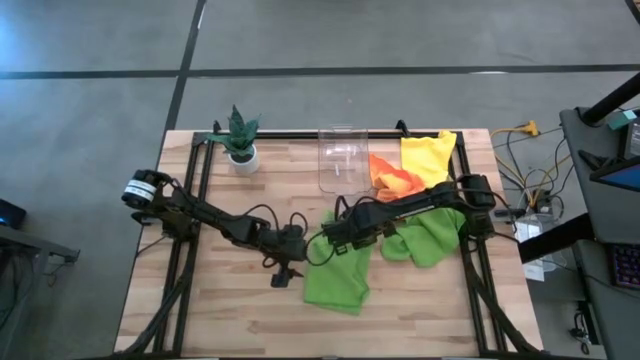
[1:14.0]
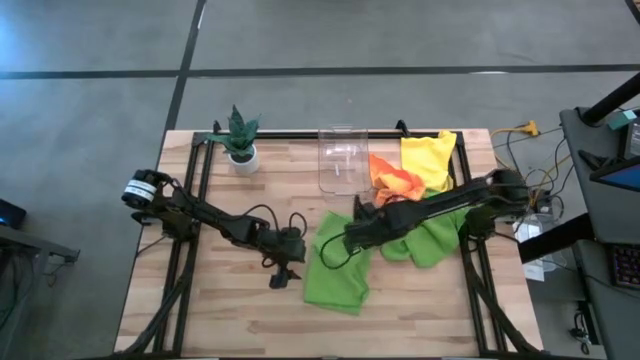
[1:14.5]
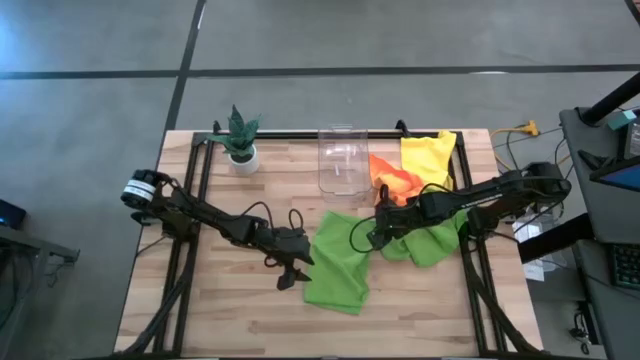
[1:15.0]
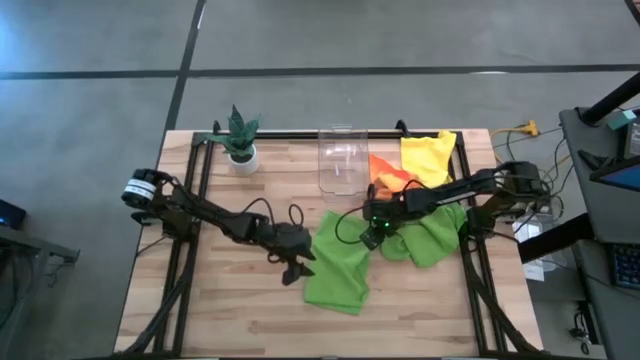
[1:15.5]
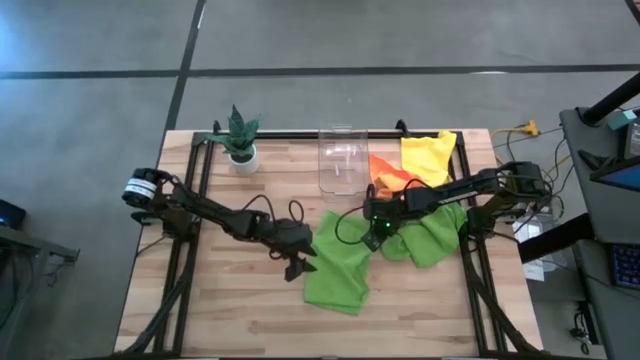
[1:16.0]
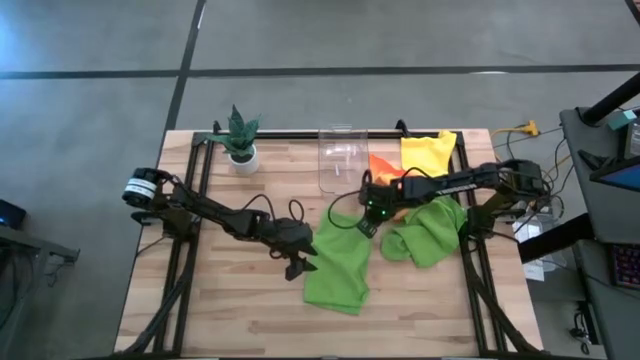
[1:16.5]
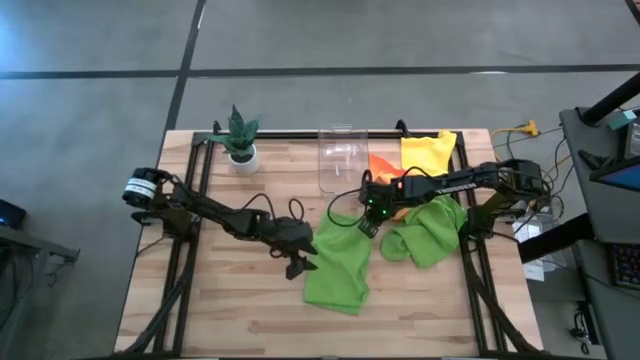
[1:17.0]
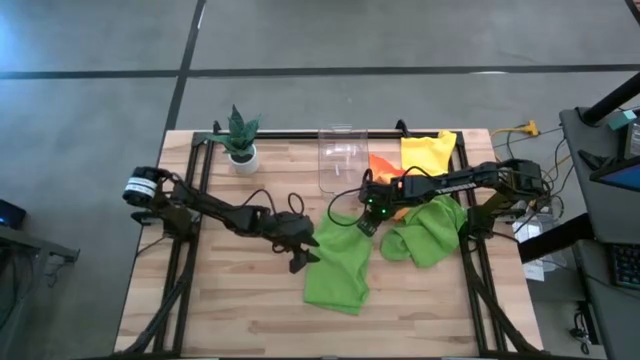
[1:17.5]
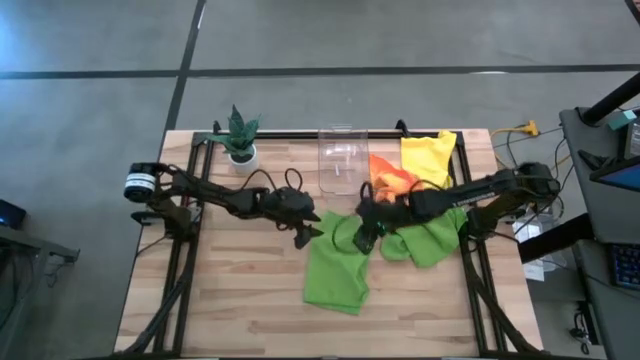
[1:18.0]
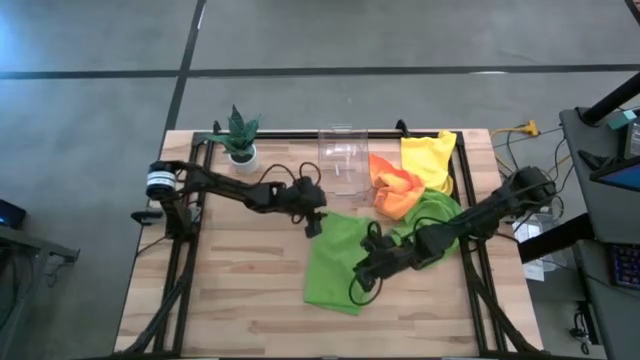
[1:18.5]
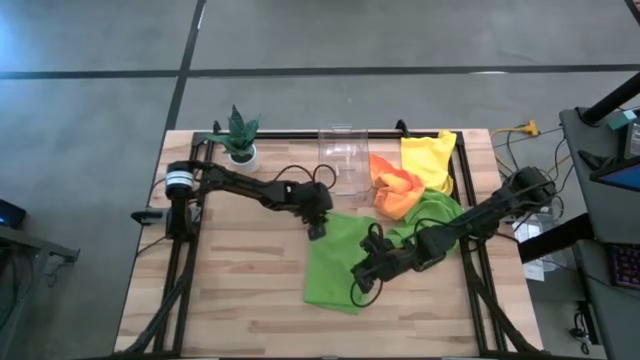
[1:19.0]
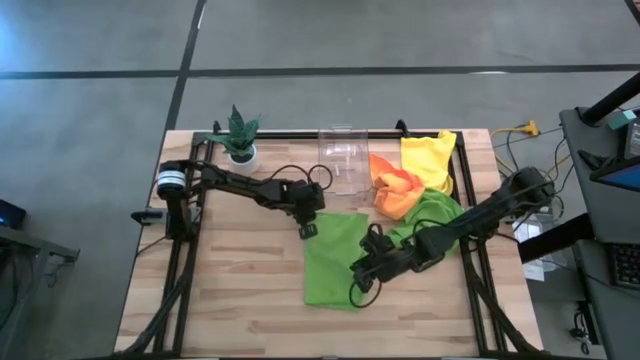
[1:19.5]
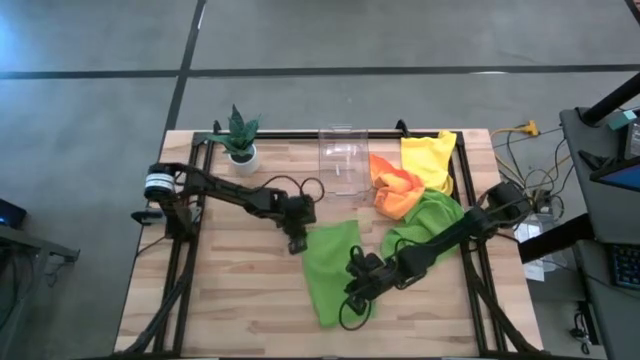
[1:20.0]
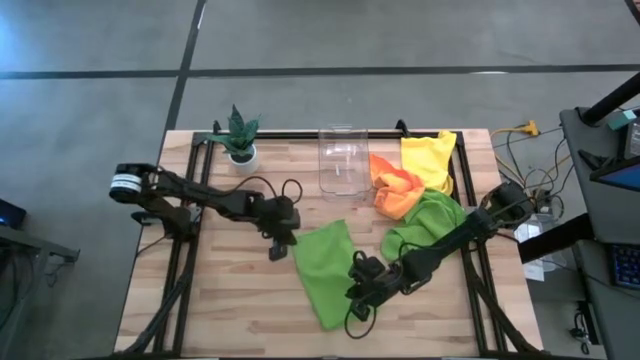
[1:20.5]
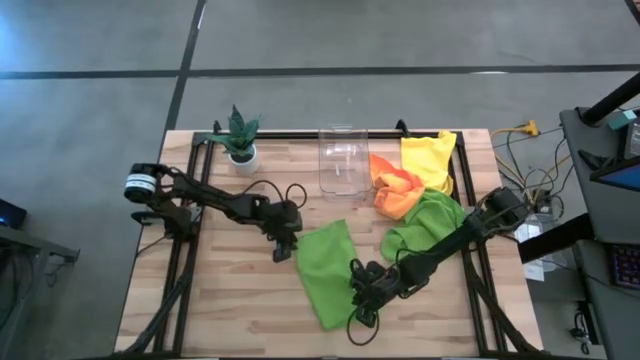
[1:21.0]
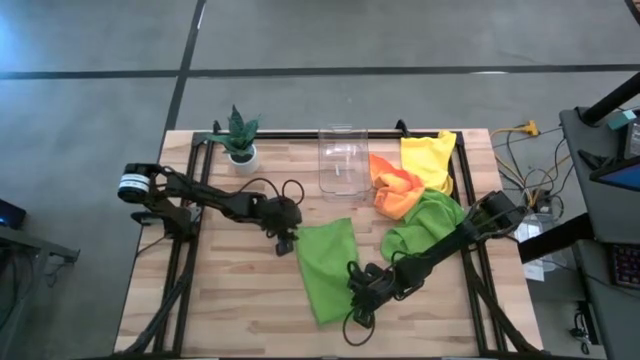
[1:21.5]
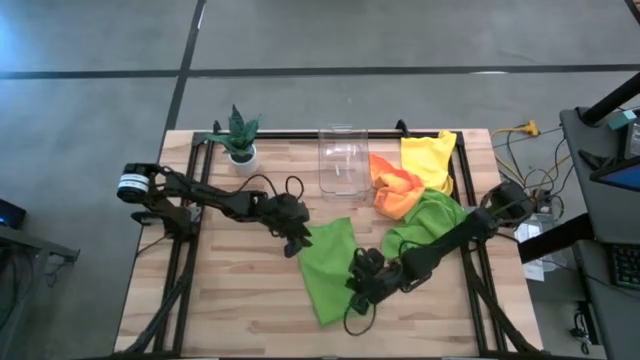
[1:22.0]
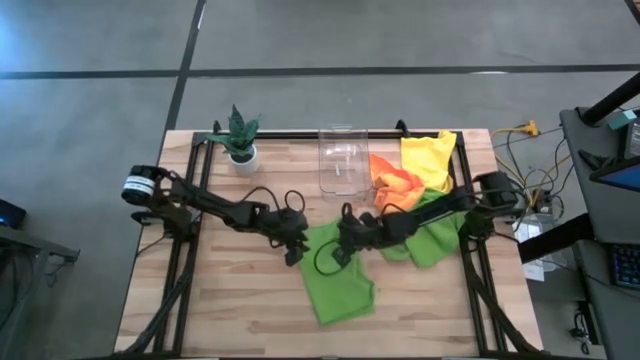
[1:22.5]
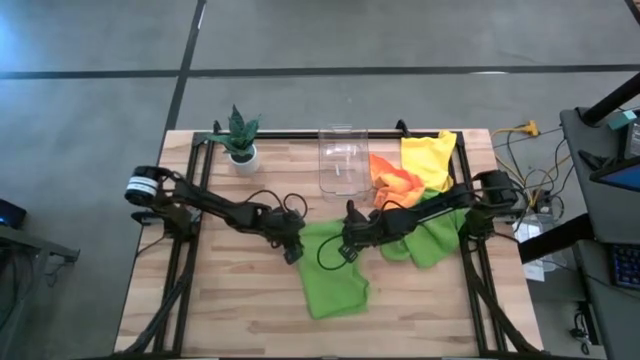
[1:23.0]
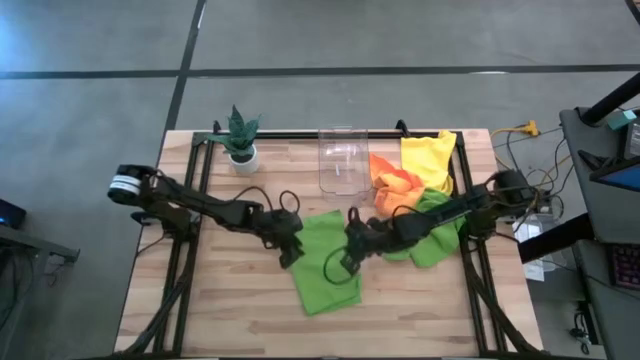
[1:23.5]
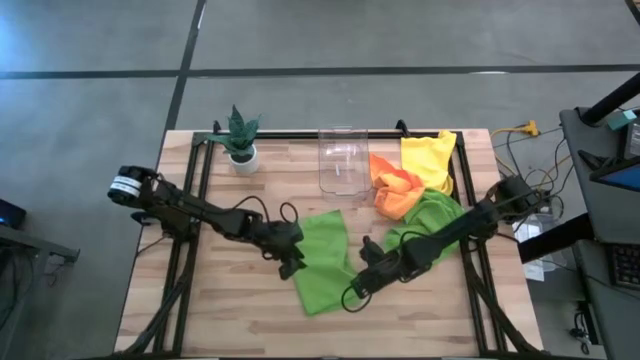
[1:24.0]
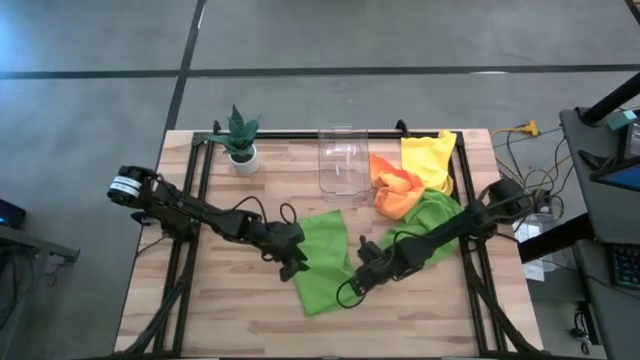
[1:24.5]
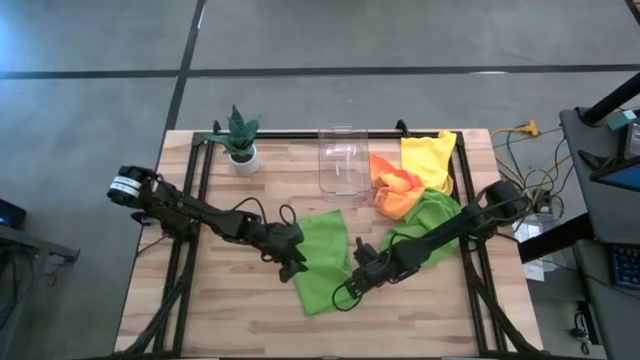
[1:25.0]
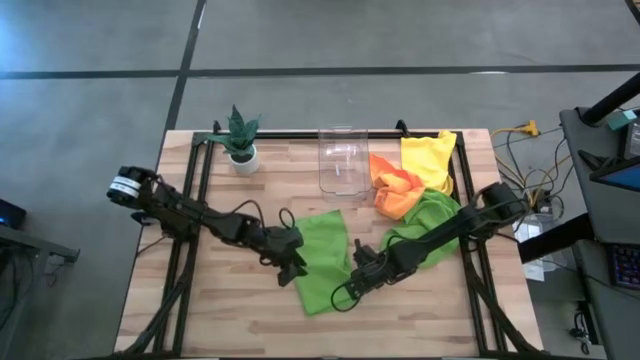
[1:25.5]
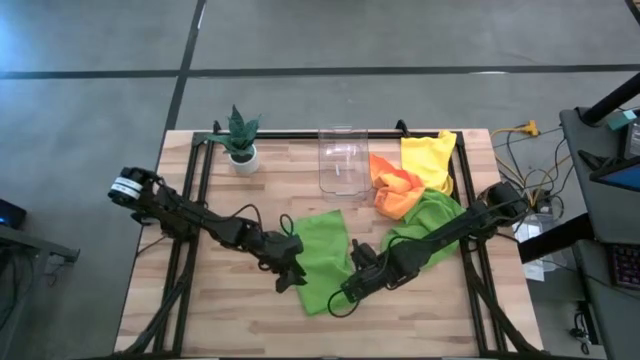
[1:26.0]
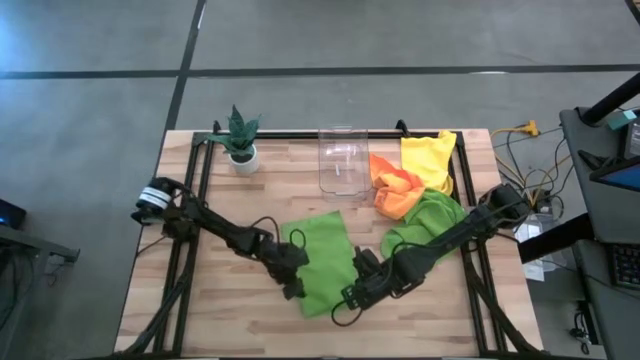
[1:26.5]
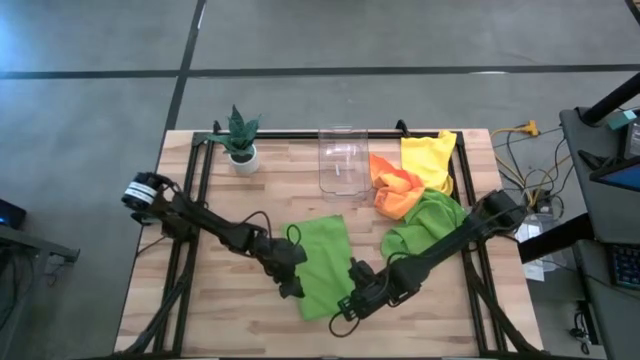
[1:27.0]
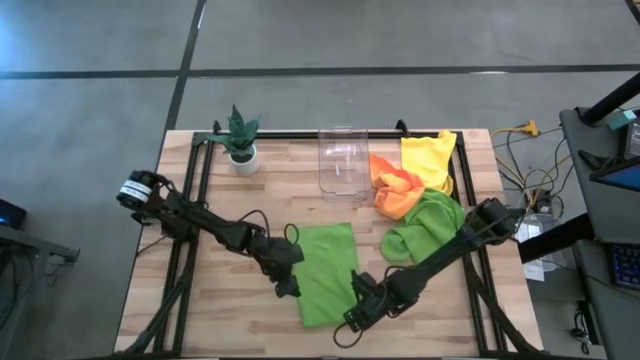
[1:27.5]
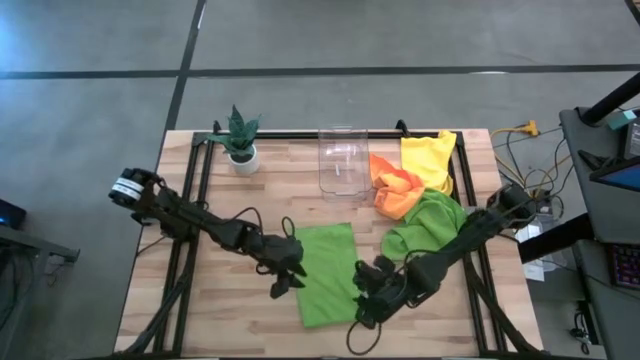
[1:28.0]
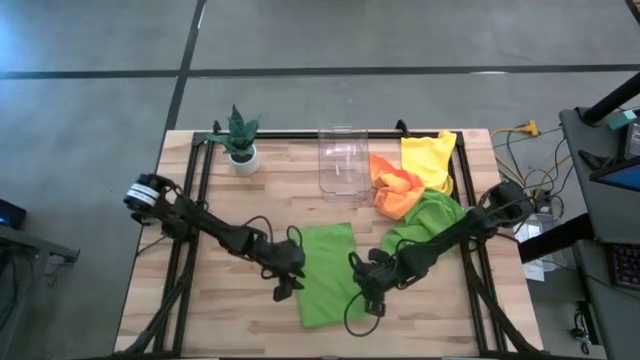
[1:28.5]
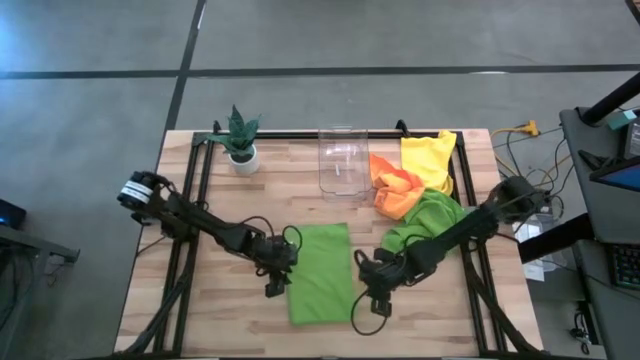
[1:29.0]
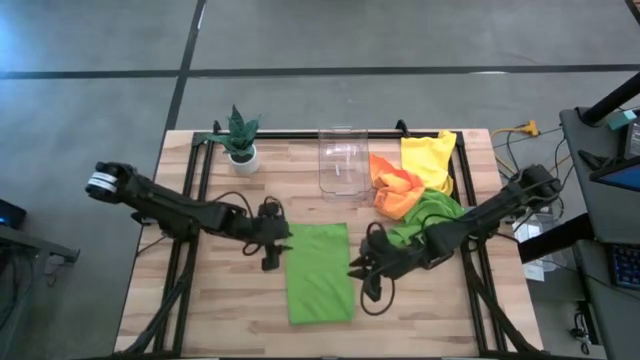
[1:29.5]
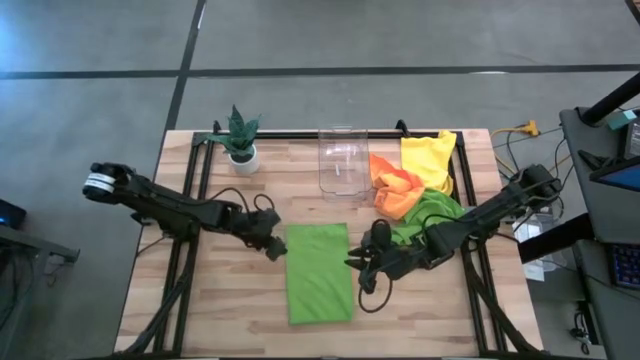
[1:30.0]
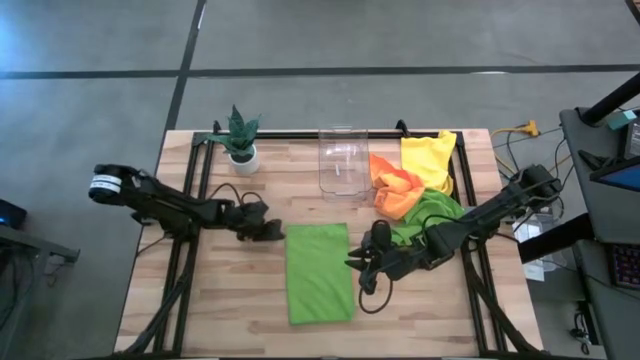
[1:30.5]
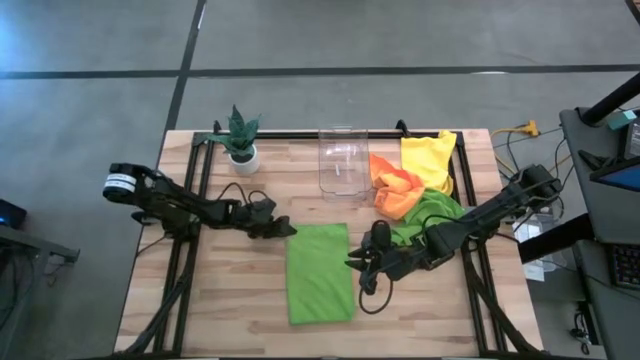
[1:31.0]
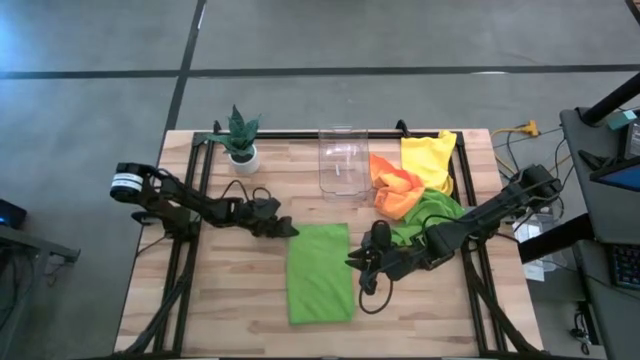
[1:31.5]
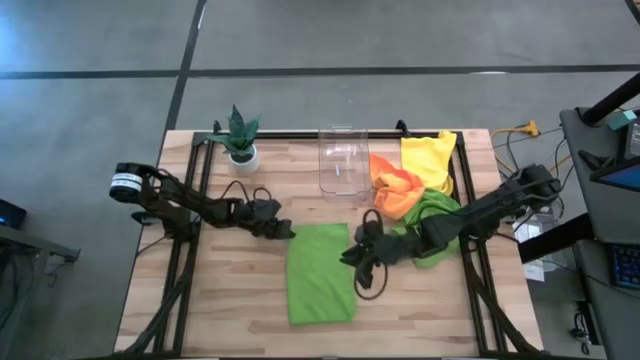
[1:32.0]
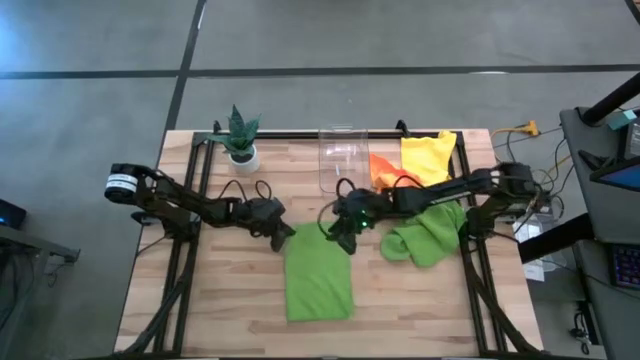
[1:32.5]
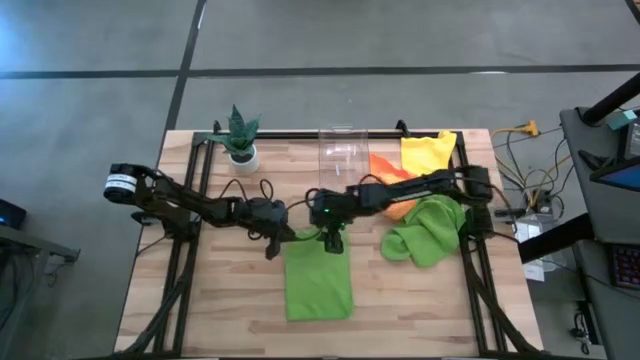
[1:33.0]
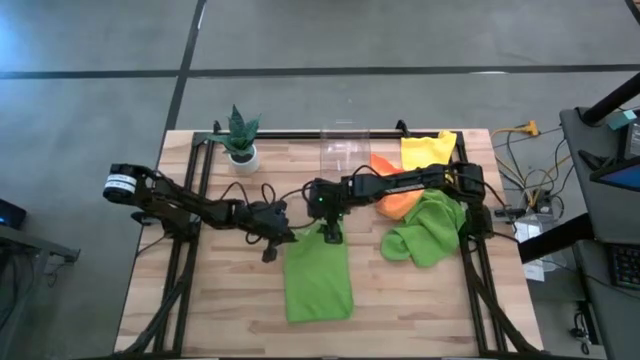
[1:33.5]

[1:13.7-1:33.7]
Task: Fold microfiber towels
Fold the top green towel
